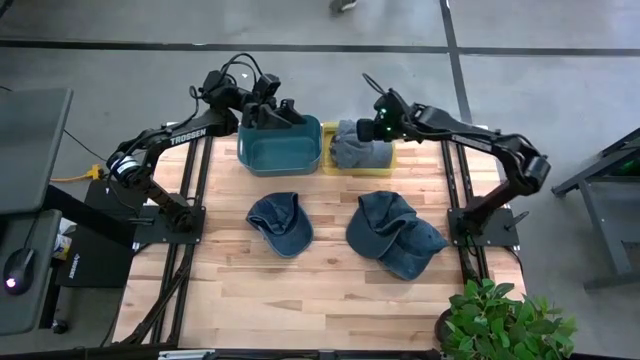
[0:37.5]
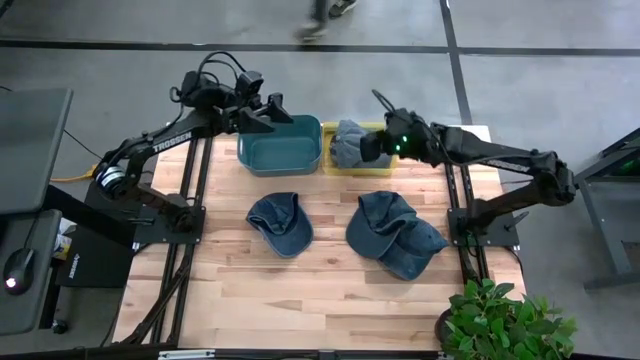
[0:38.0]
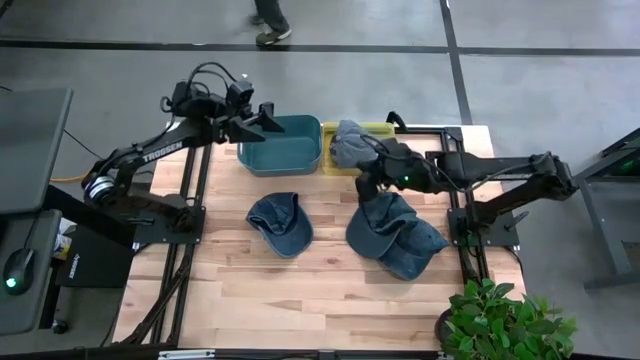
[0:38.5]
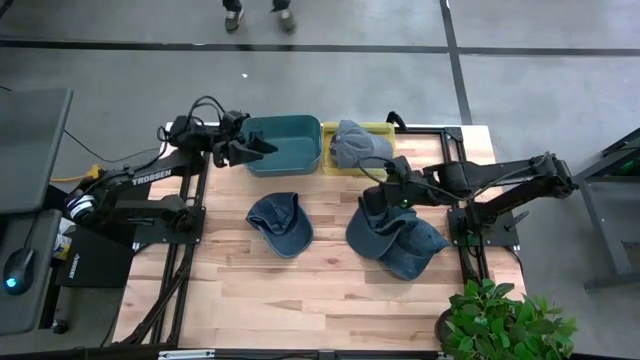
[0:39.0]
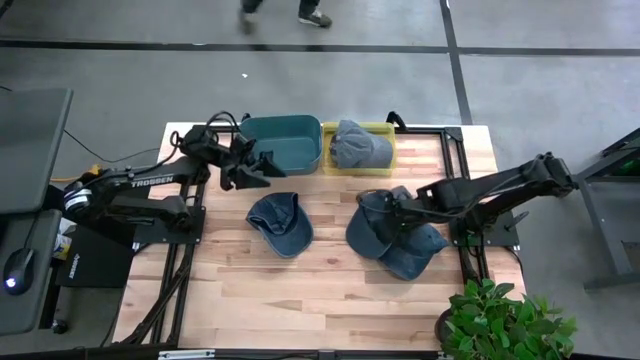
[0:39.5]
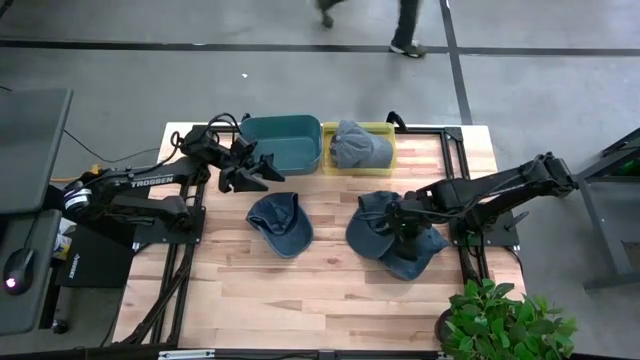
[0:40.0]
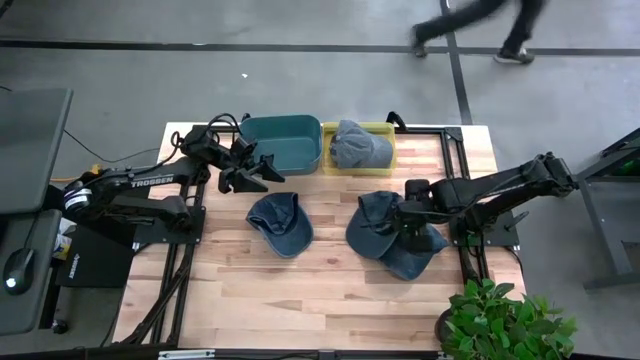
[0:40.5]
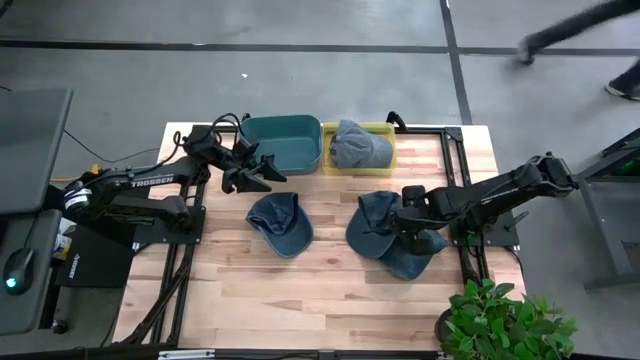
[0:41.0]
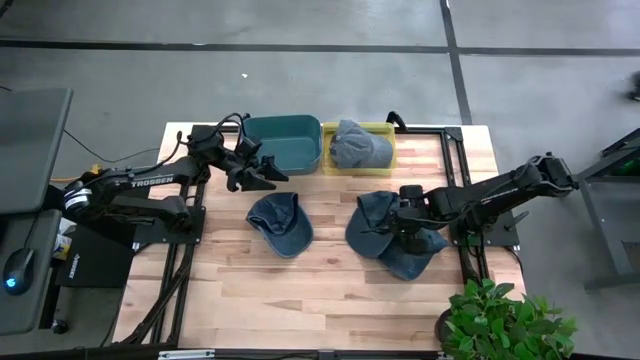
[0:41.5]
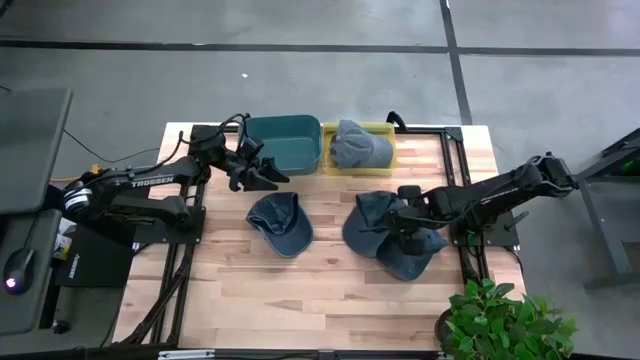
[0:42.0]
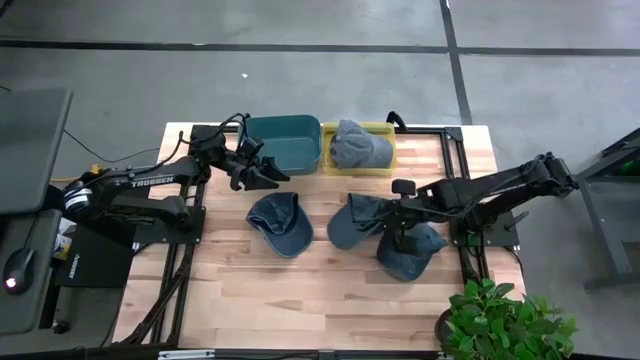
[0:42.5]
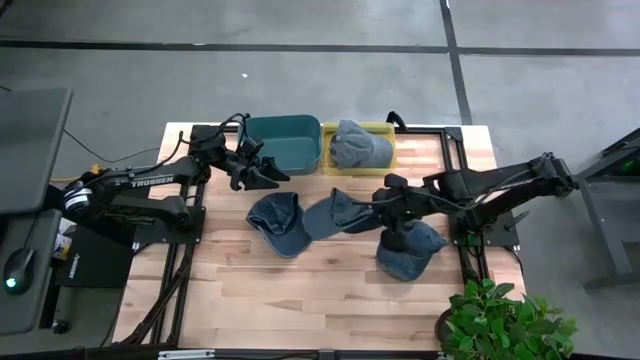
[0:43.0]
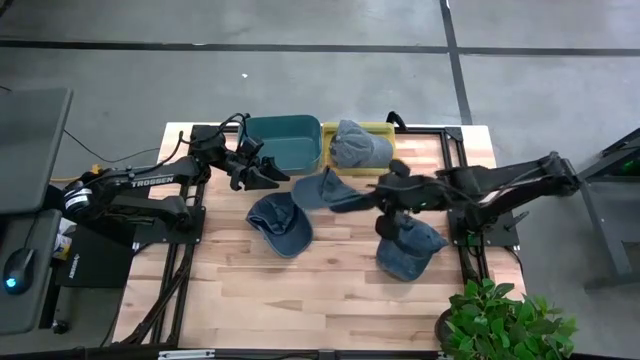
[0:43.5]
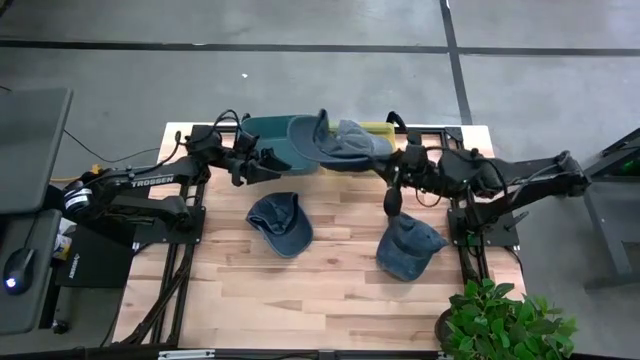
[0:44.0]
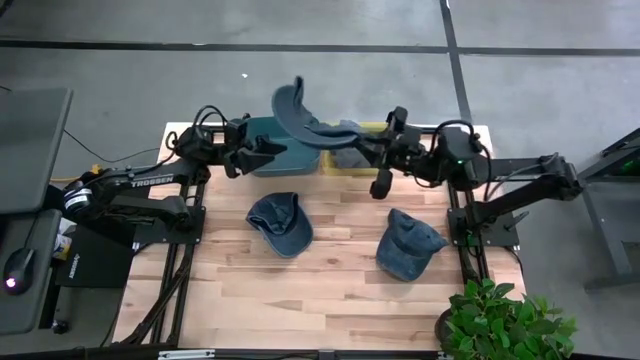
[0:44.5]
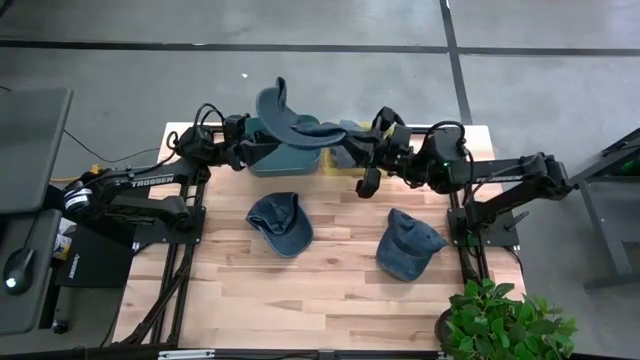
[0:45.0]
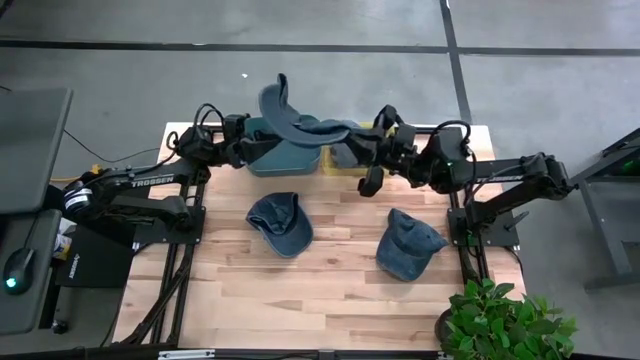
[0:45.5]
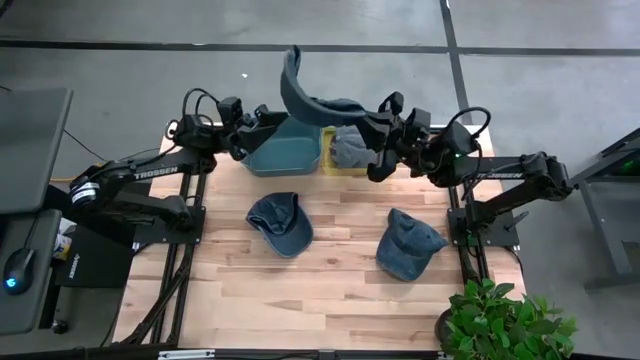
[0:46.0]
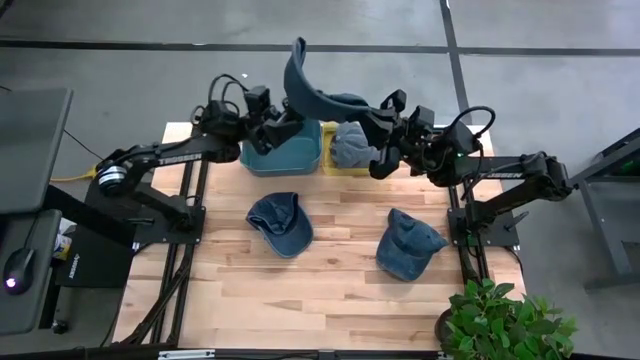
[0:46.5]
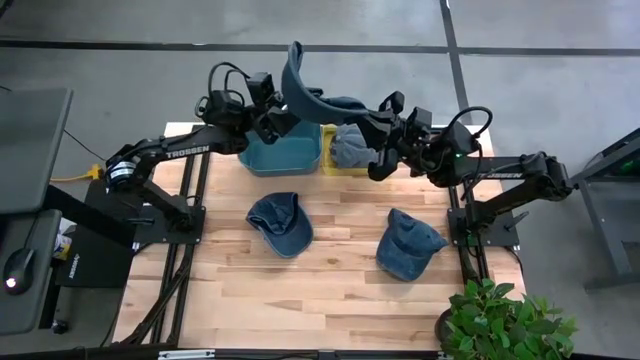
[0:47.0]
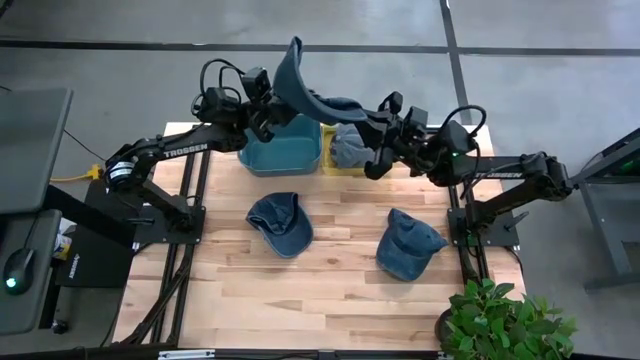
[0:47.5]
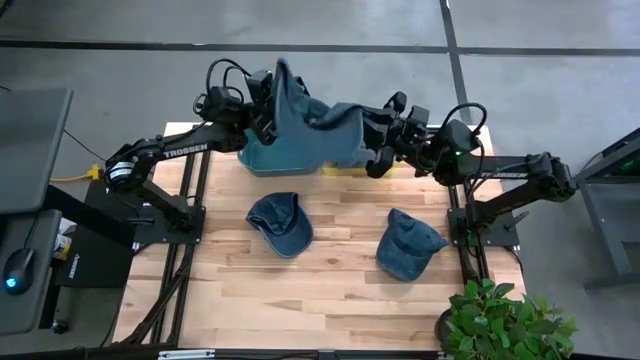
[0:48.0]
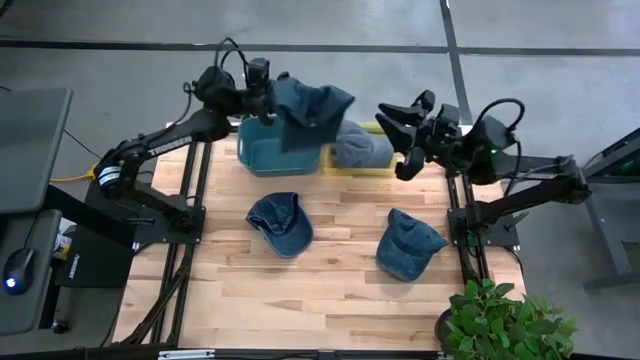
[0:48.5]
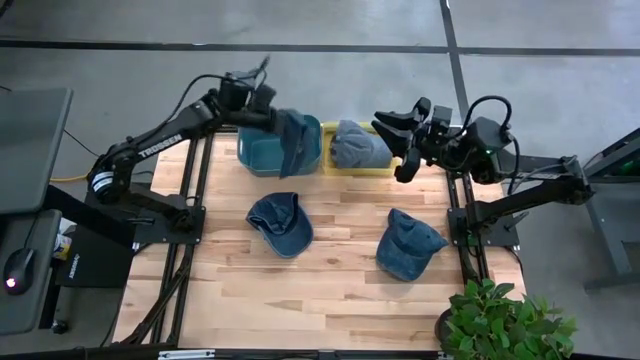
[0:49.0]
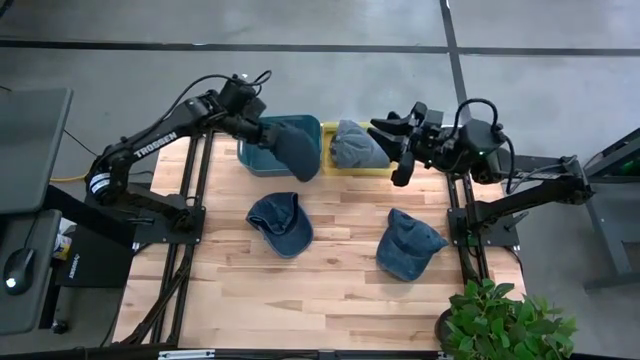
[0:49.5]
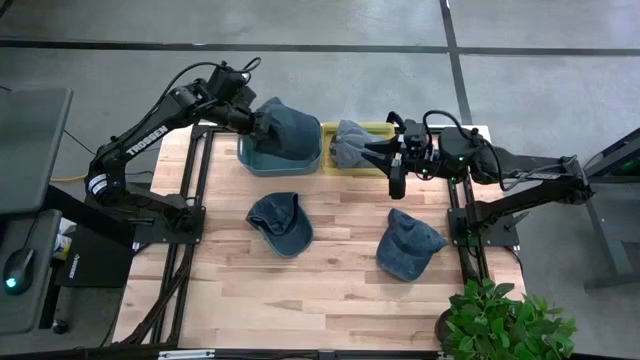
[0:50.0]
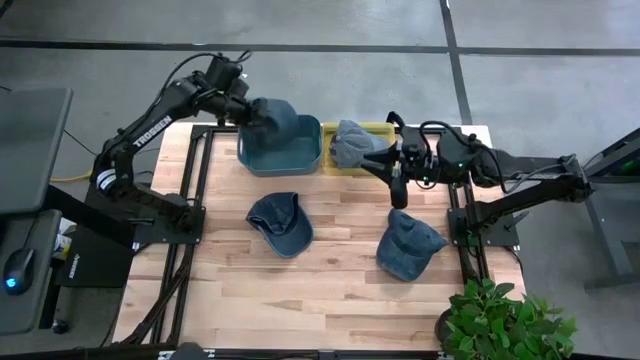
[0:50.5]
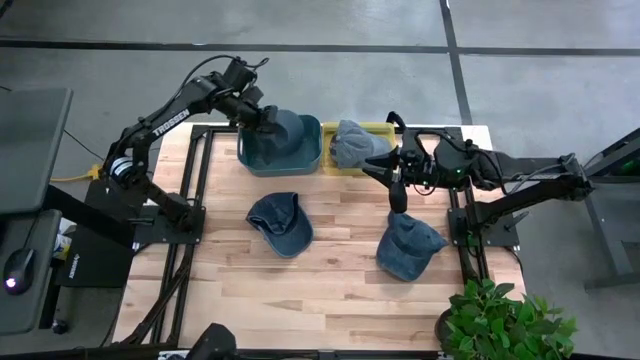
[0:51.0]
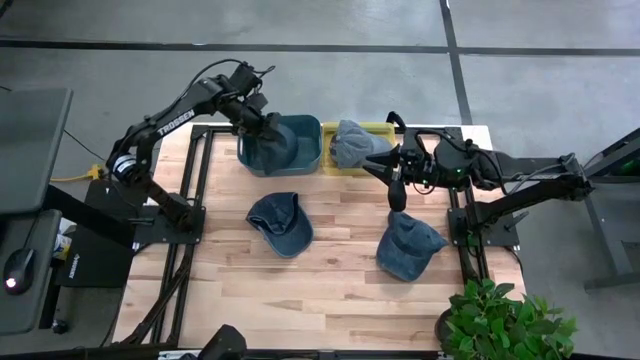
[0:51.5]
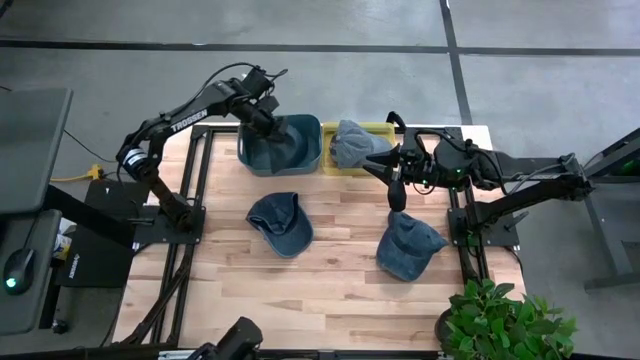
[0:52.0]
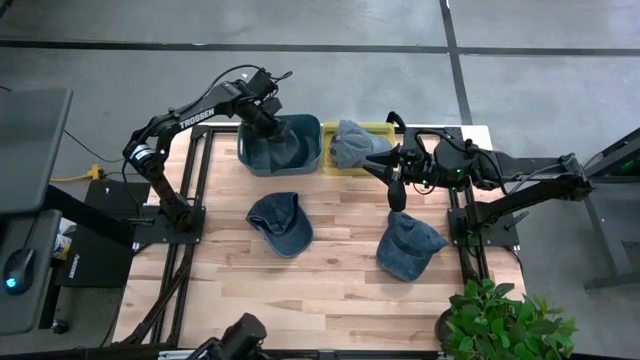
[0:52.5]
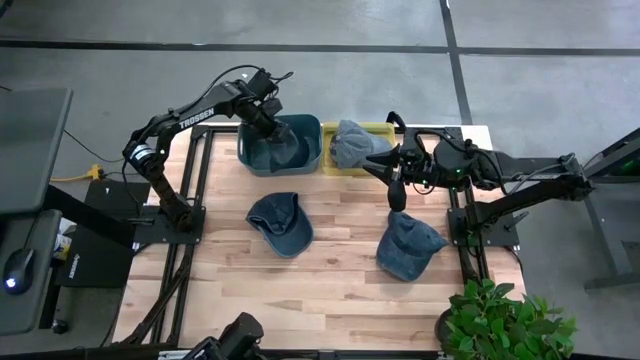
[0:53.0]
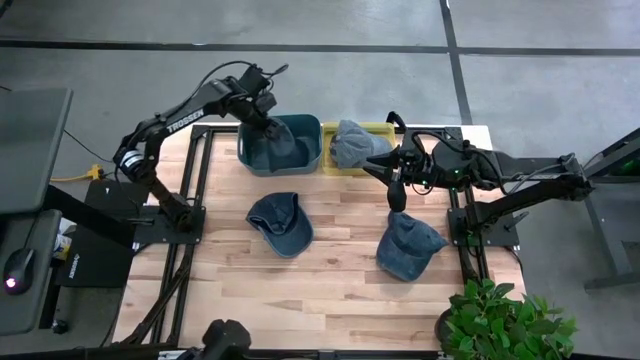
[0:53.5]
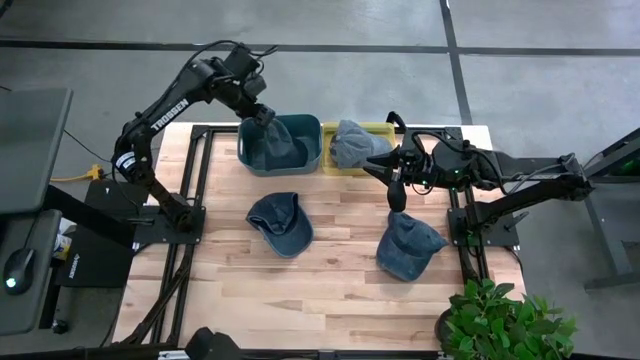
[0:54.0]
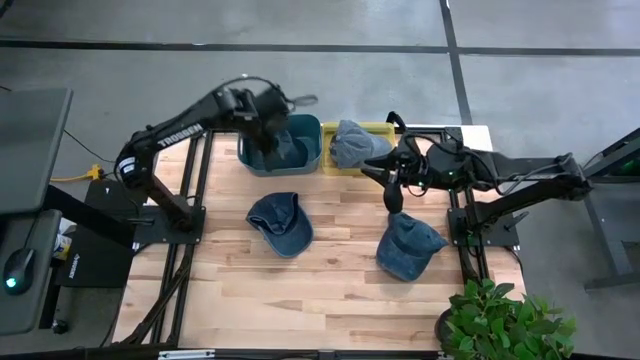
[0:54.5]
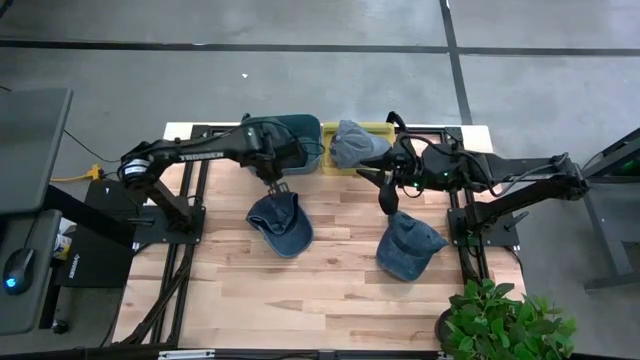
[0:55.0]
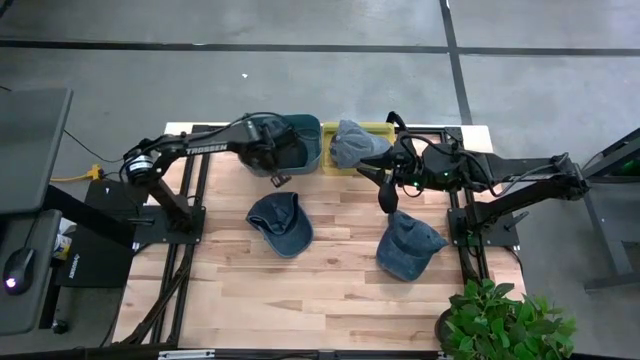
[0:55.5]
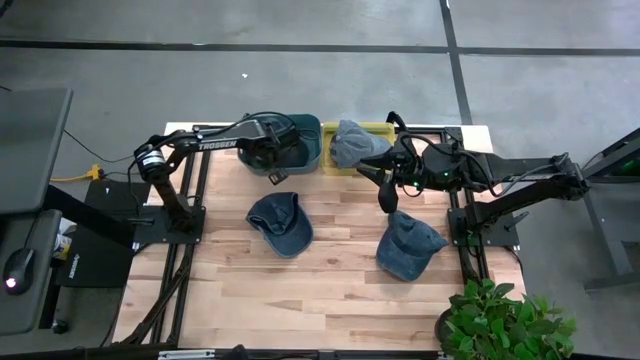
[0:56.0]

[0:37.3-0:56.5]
Task: Pick & Place hat
Put the top right blue cap into the blue bin

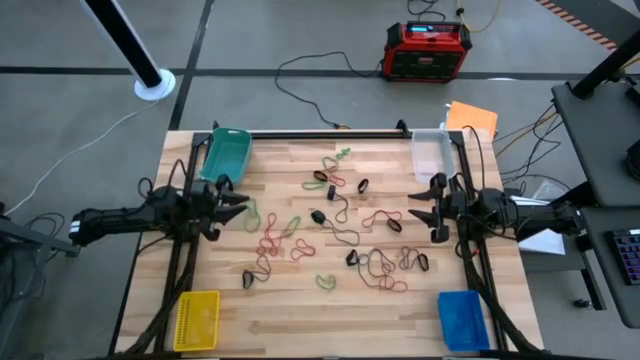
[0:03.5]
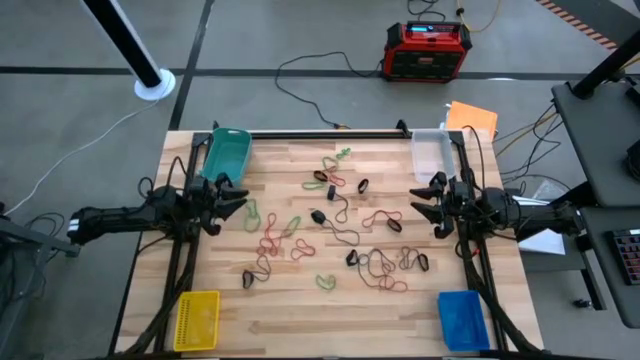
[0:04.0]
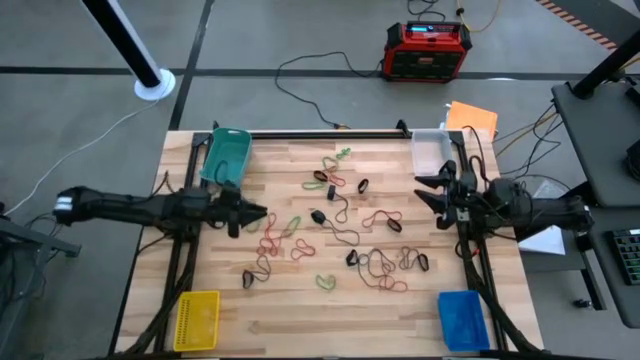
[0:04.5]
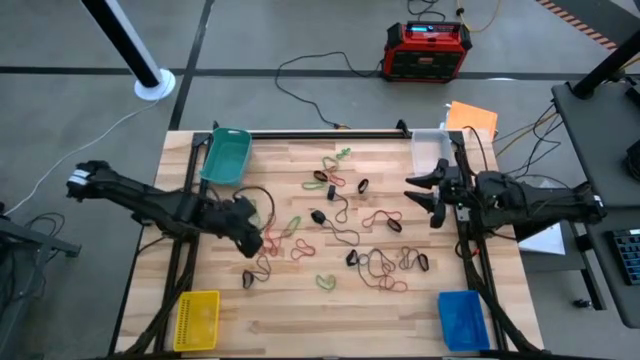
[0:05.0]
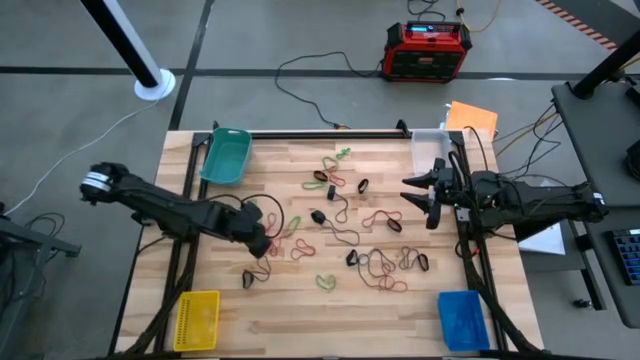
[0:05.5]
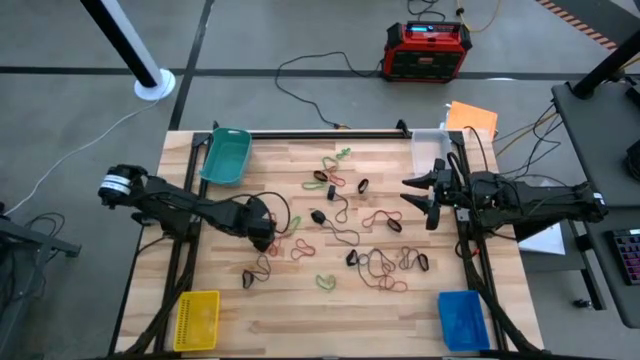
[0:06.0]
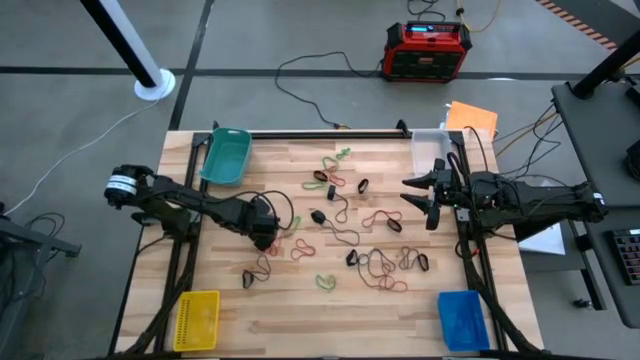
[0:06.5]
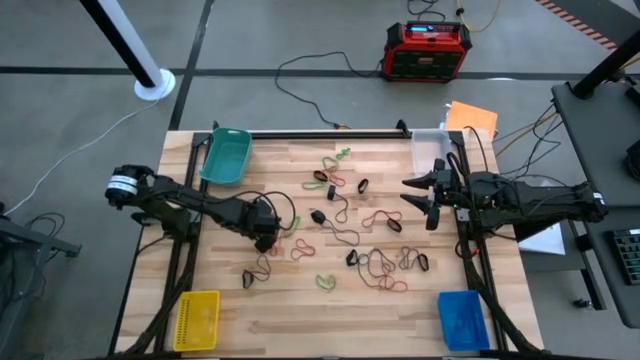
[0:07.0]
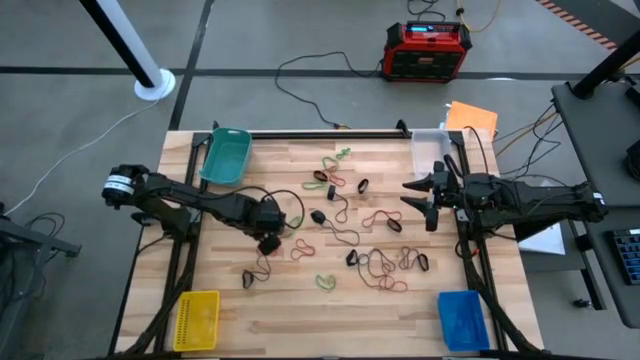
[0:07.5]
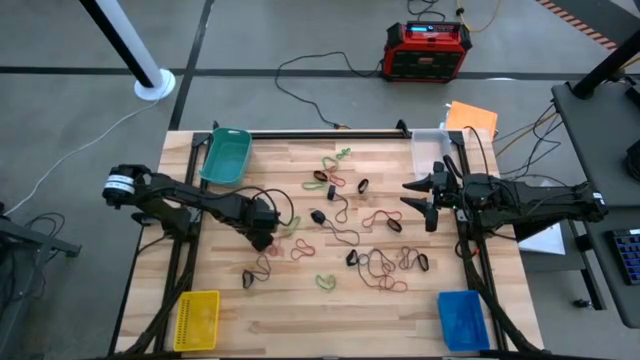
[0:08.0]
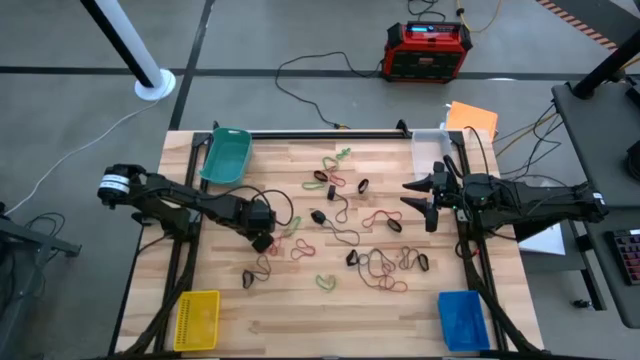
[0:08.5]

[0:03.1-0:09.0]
Task: Sort rubber bands into baskets
Put the green rubber band into the yellow bin
